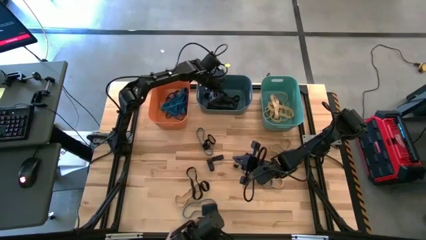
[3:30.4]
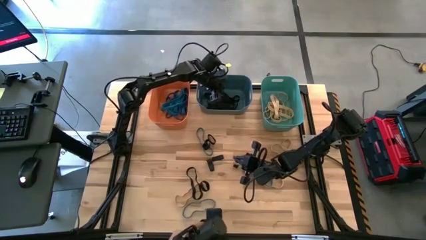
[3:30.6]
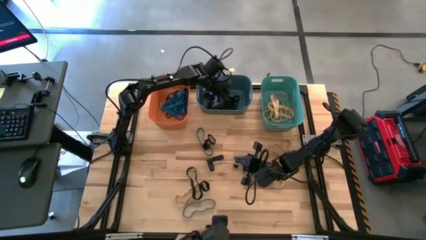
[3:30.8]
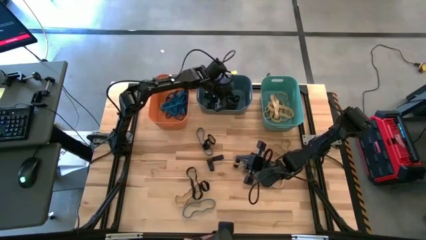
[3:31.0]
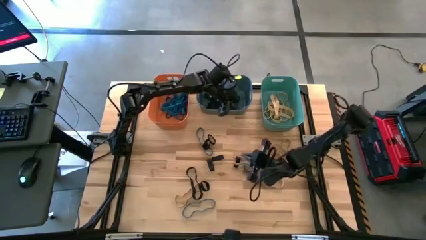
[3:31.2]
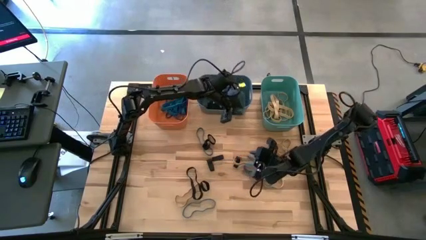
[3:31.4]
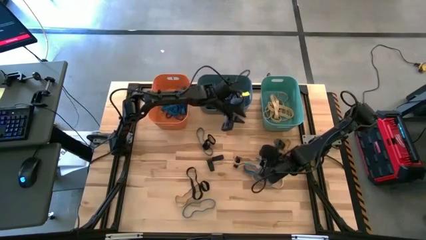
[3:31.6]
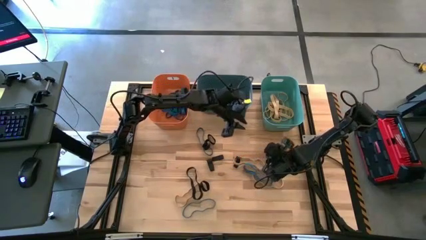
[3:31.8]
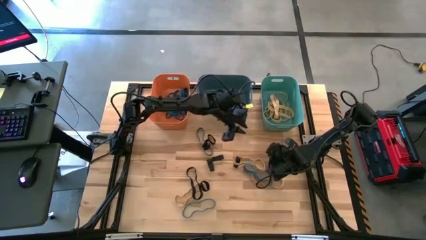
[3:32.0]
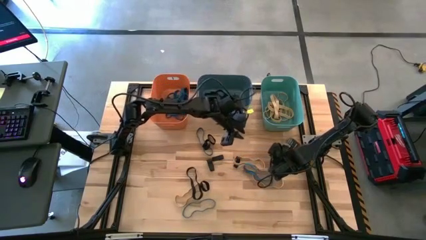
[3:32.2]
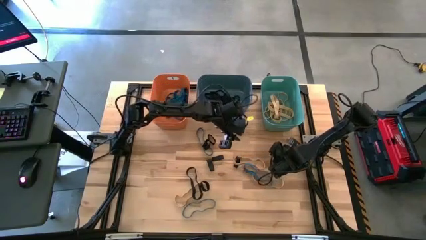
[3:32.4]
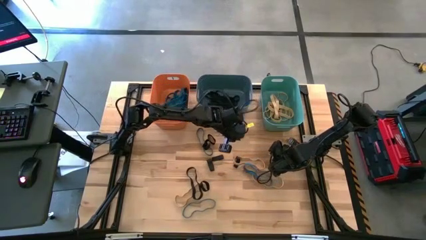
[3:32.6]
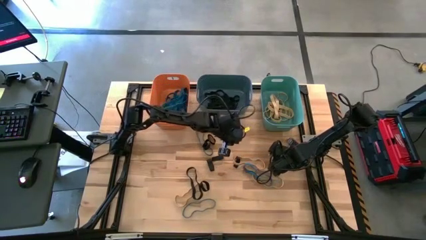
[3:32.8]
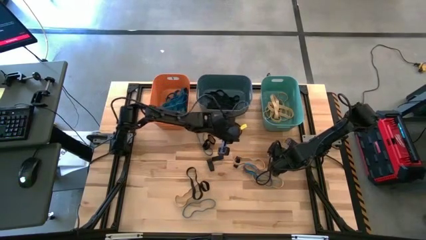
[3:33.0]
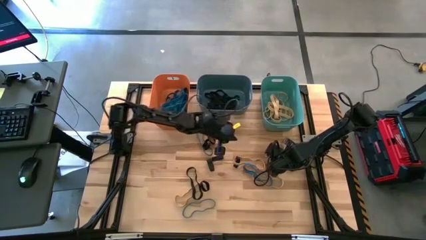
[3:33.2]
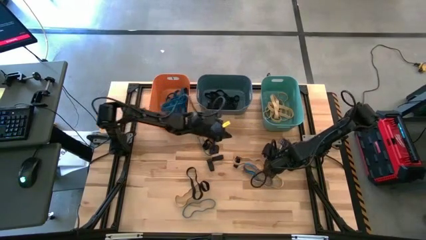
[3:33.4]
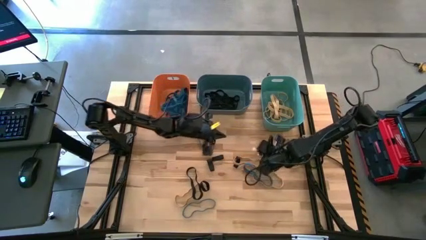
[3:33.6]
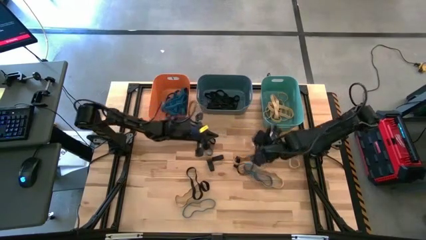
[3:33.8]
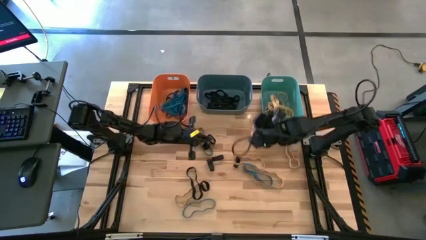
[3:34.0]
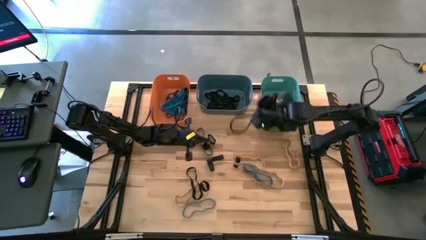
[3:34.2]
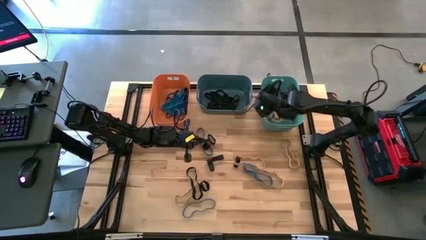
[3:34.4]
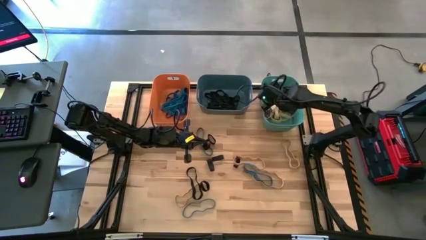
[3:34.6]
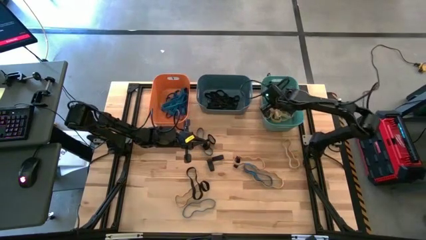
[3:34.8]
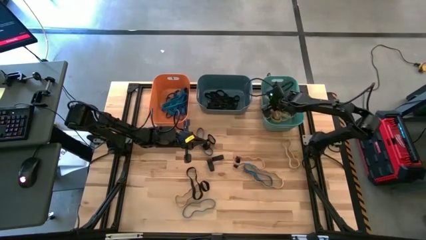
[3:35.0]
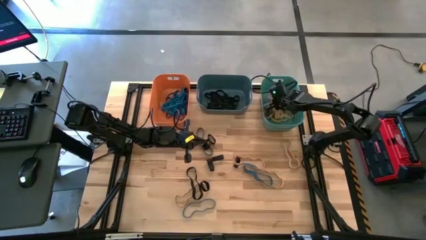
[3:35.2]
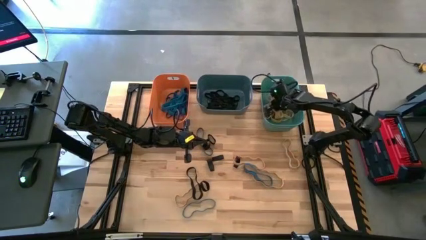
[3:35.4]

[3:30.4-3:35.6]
Task: Sort rubber bands into baskets
Put the brown rubber band into the green bin

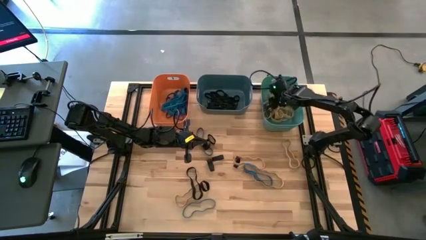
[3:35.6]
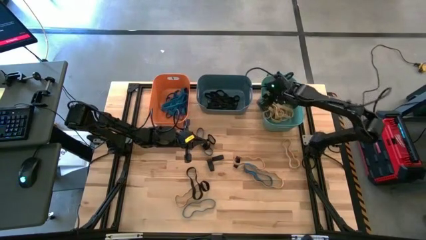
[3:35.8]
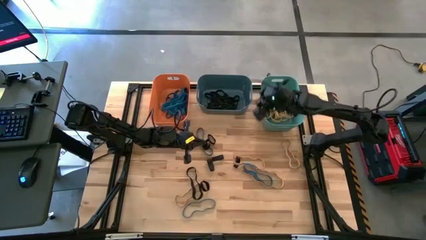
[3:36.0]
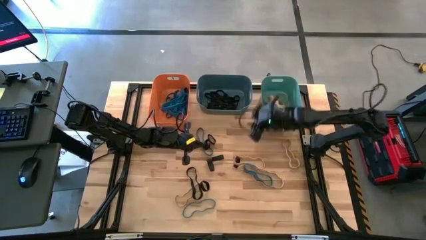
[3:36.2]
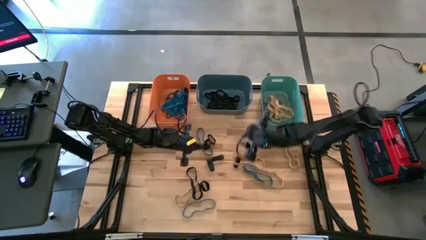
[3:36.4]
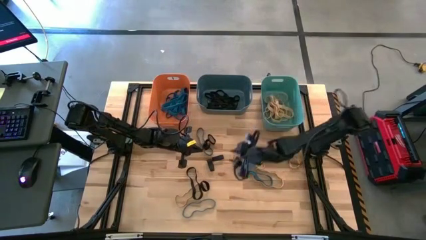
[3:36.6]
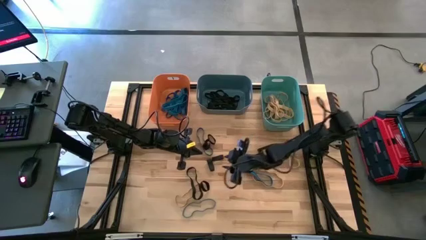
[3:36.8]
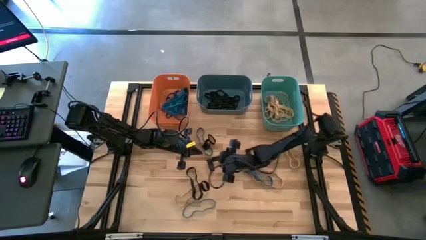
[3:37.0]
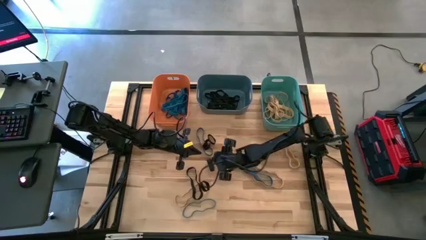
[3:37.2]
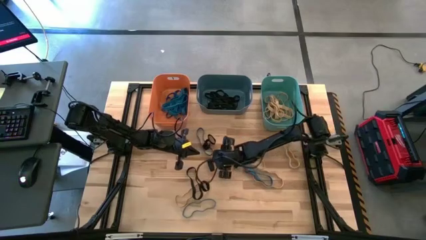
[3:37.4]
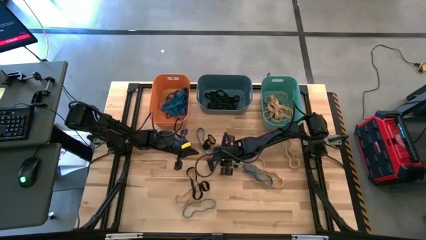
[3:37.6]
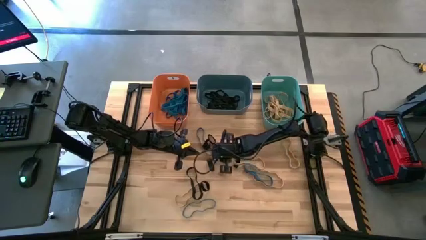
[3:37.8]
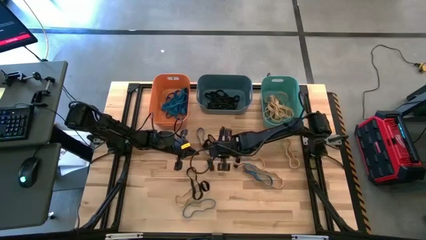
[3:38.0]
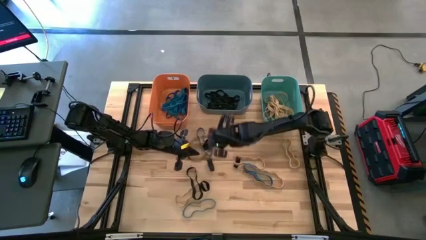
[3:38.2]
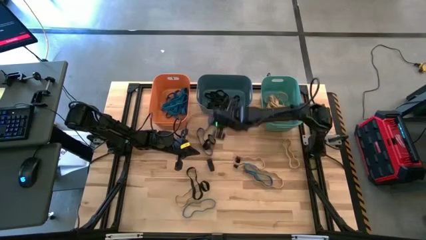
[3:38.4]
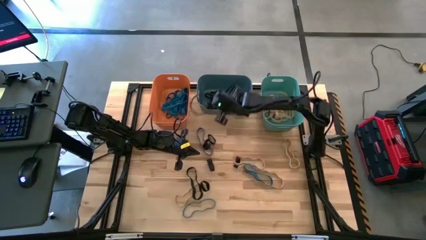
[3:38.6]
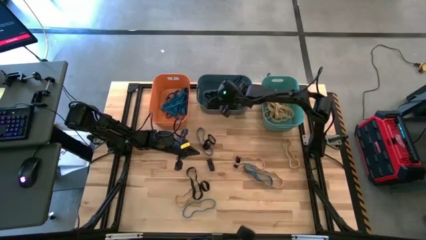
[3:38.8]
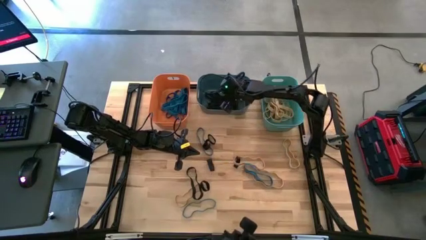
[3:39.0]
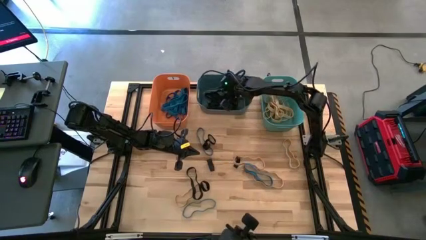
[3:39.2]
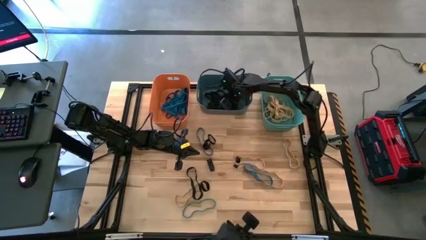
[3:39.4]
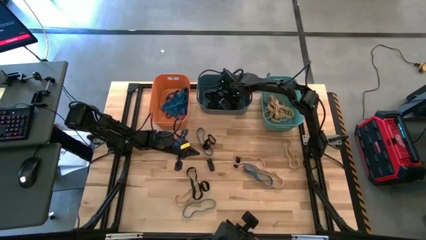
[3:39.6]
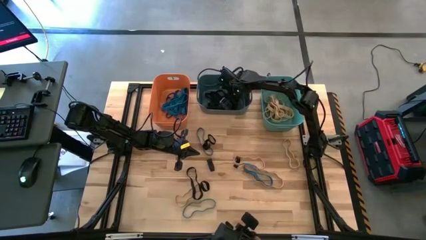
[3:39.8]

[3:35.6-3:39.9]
Put the black rubber band into the blue bin

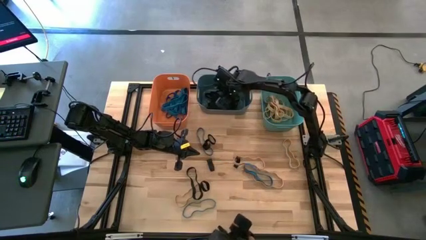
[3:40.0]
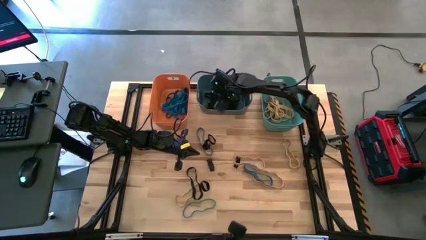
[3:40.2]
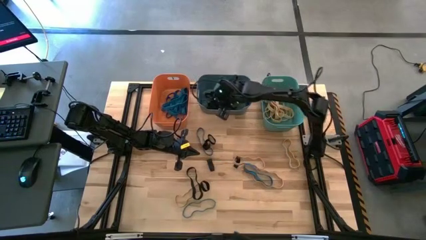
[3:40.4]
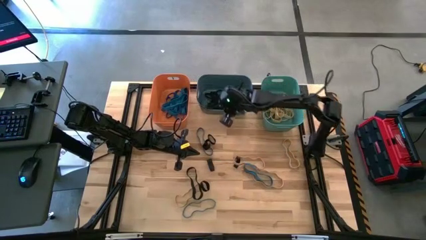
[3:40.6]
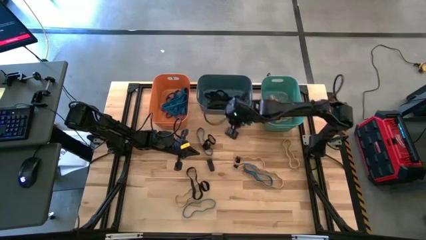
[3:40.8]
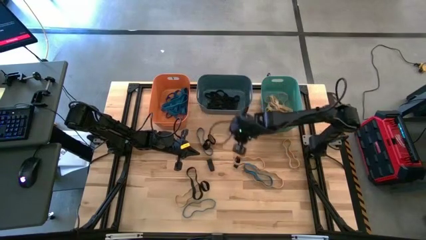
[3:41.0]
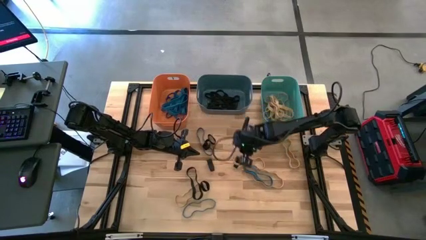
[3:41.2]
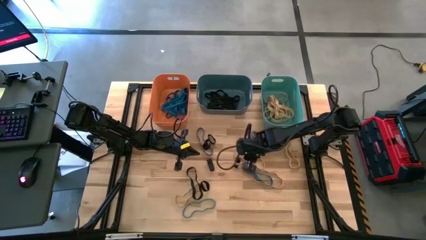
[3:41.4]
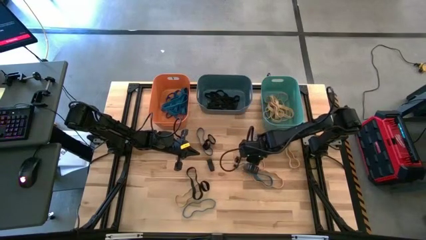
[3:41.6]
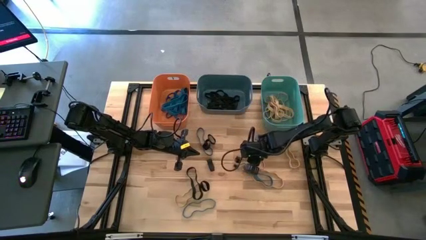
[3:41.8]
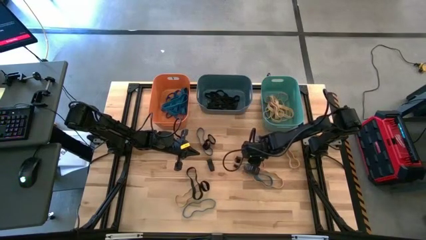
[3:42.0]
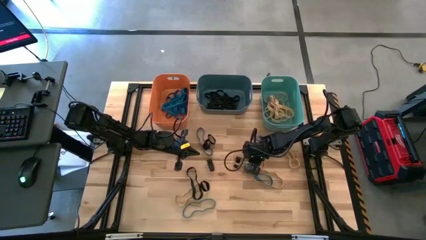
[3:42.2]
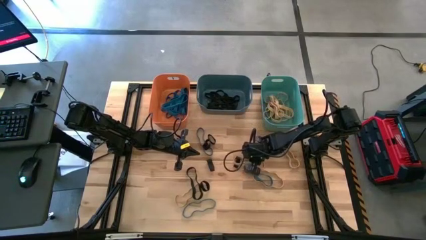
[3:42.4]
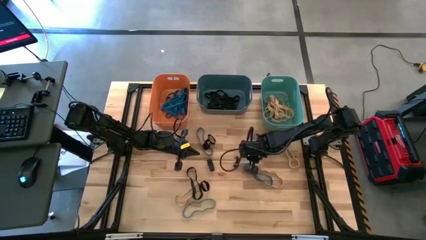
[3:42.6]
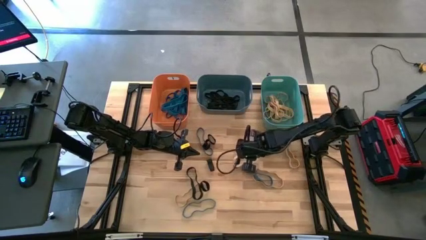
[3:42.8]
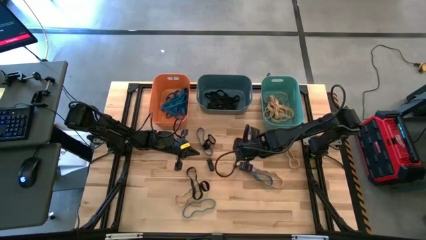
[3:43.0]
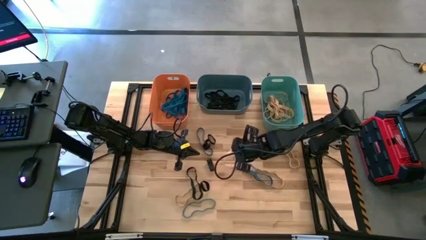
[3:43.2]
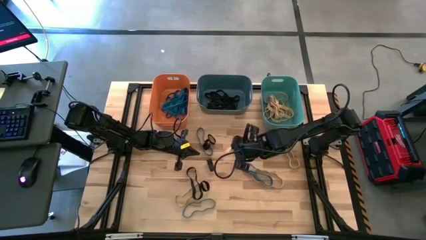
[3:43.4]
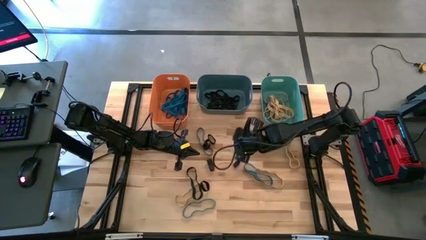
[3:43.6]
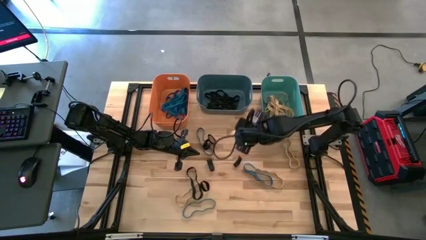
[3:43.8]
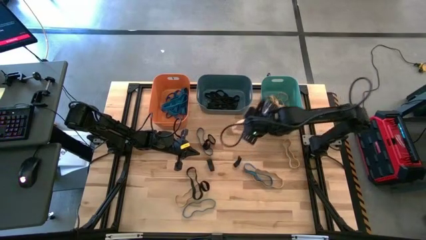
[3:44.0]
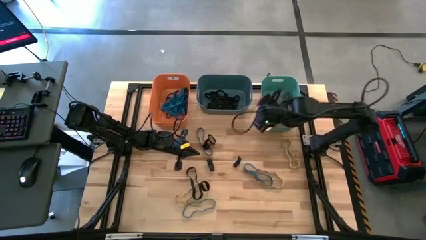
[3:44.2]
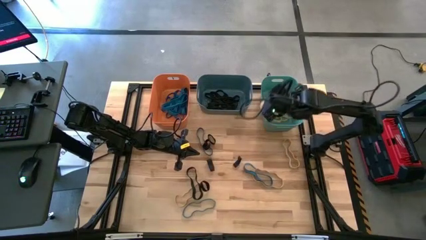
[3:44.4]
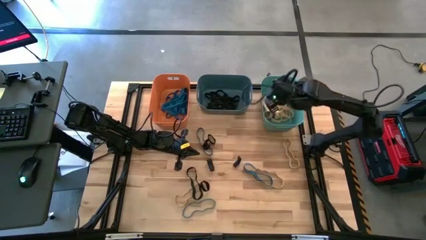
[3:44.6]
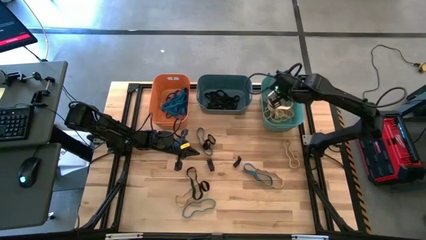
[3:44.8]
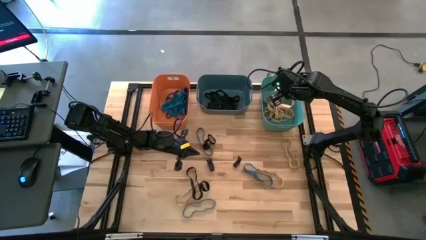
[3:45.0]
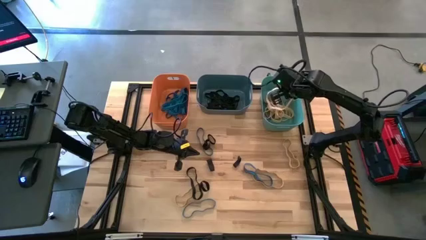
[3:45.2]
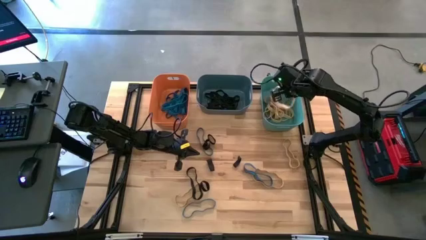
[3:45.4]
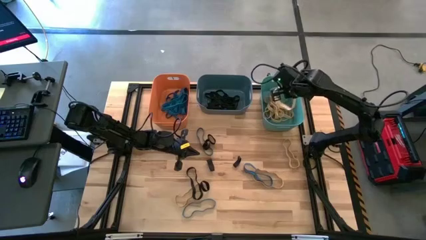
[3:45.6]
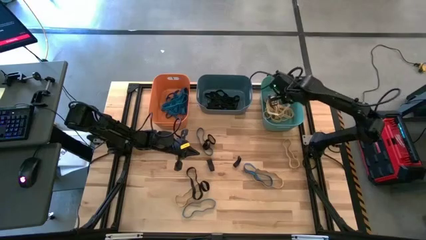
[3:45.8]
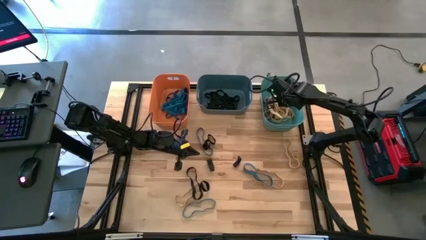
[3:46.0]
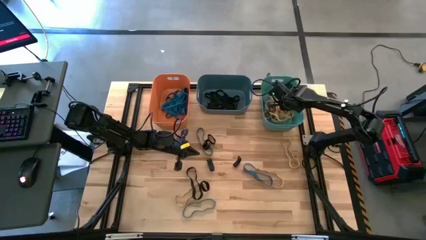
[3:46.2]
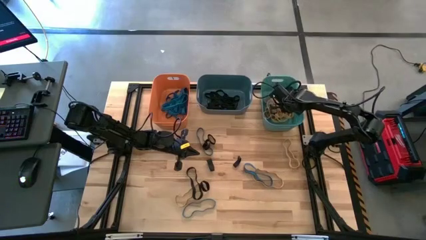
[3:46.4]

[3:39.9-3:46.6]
Put the brown rubber band into the green bin
